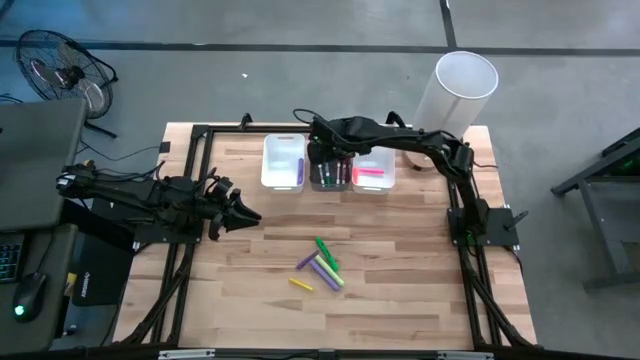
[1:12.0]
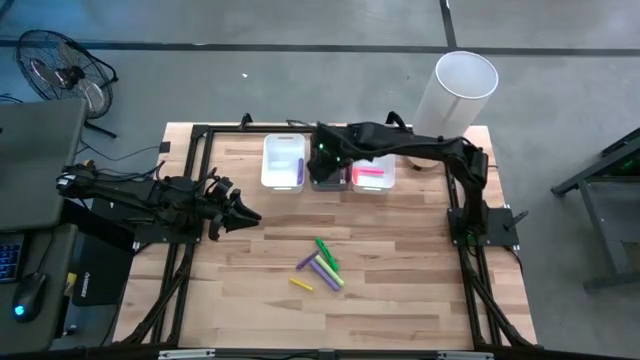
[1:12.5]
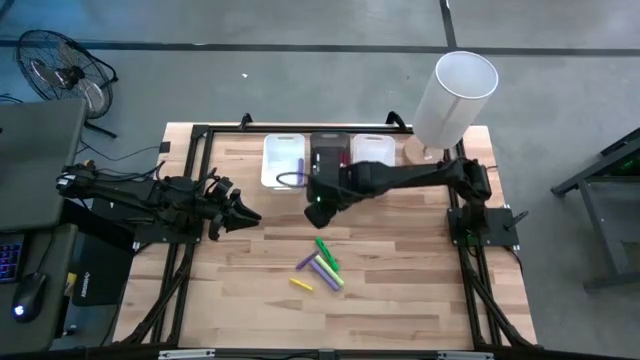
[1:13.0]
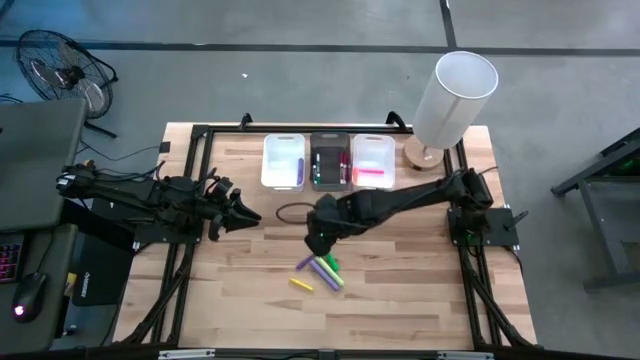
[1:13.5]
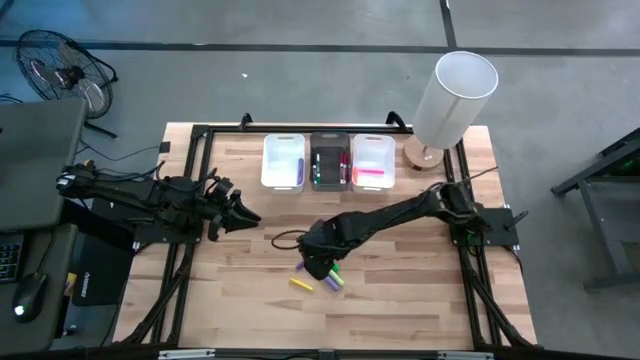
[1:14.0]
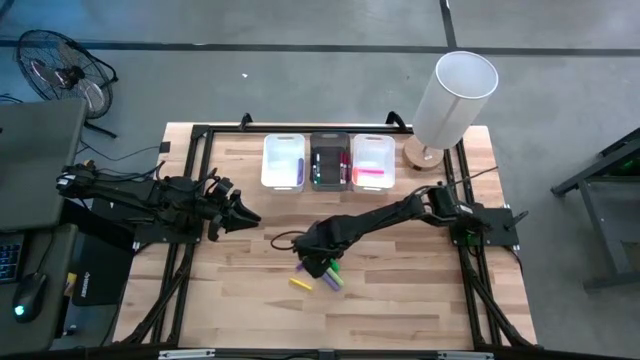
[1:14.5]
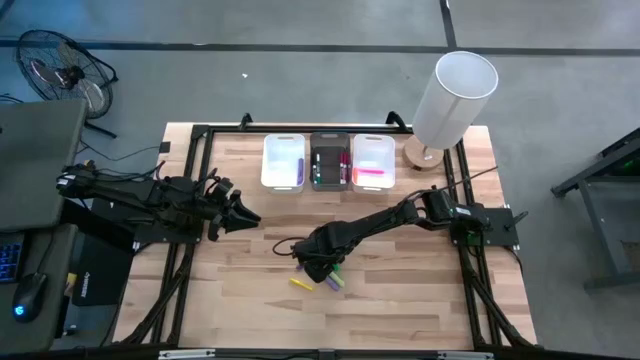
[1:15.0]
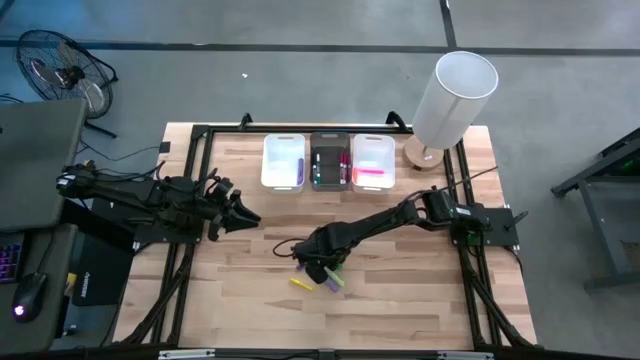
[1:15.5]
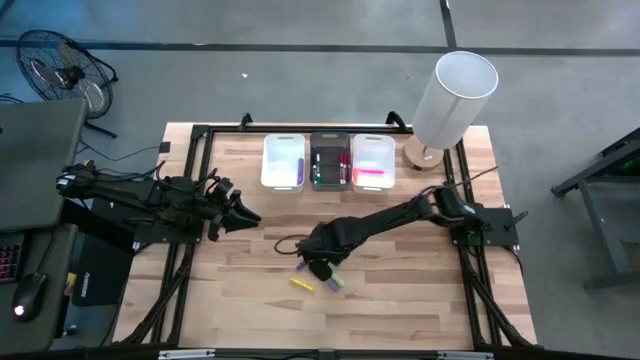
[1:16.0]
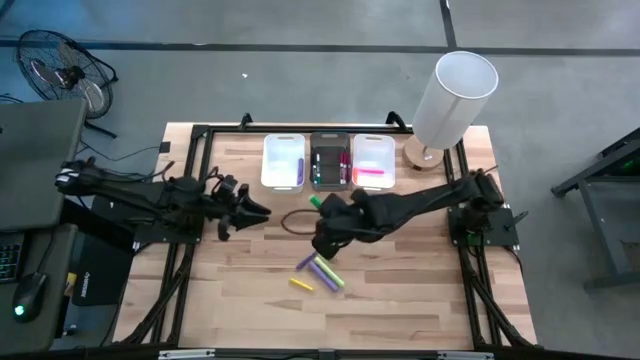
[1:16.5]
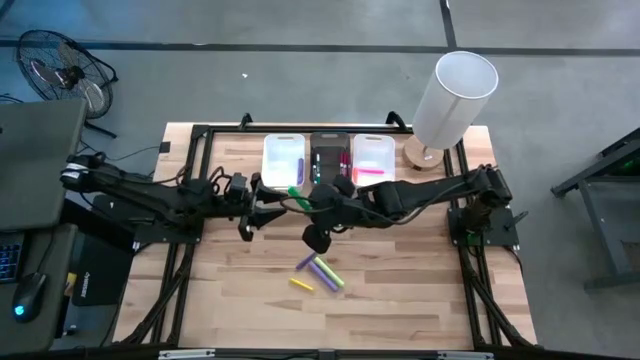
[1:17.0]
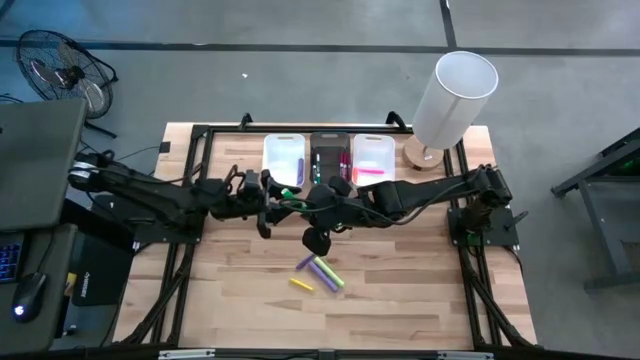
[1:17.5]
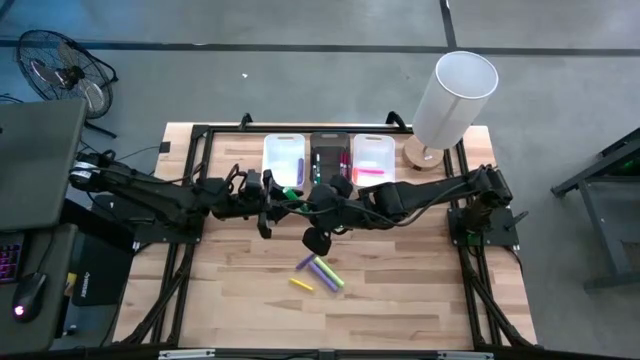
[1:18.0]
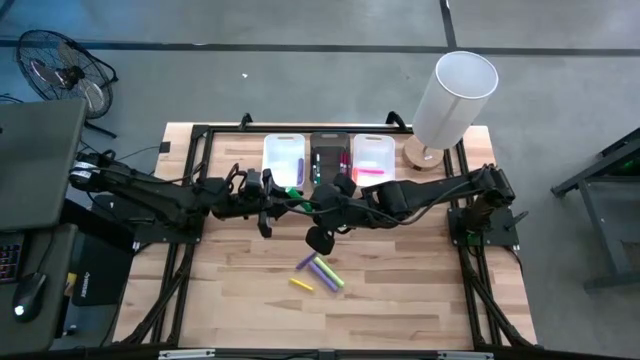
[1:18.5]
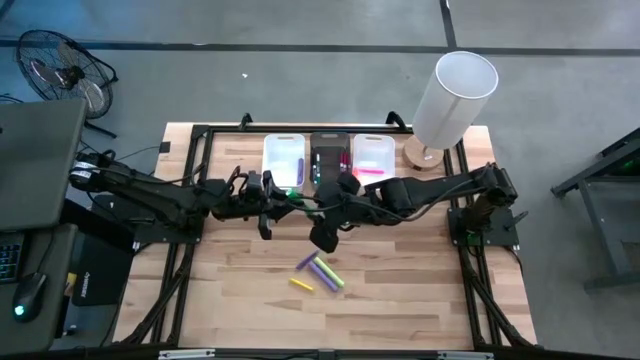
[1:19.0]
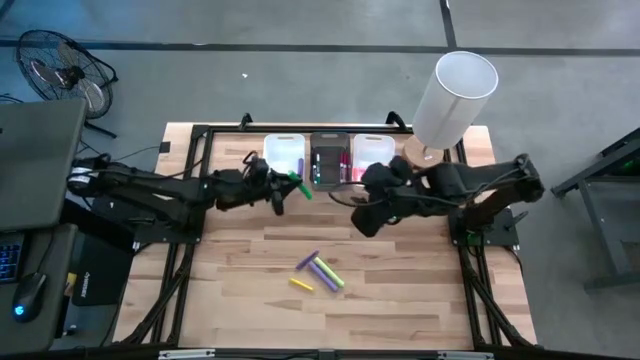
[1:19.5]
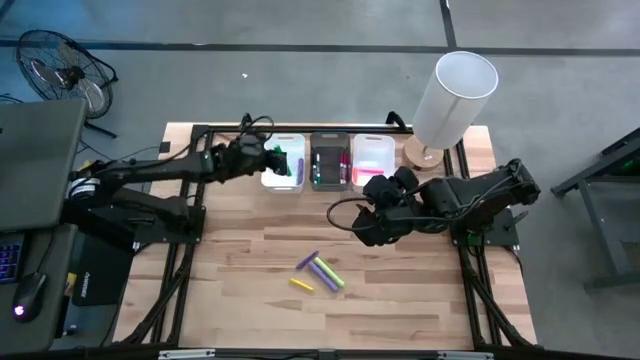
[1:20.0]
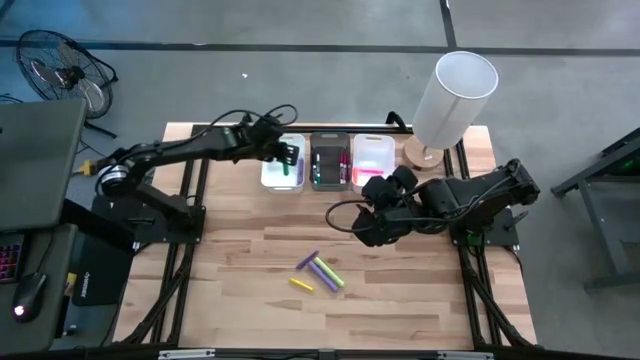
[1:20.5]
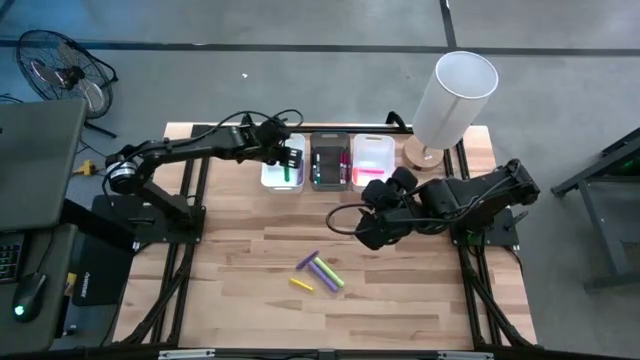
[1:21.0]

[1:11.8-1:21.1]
Task: Pick & Place Markers
Put the green highlighter pen into the left white bin

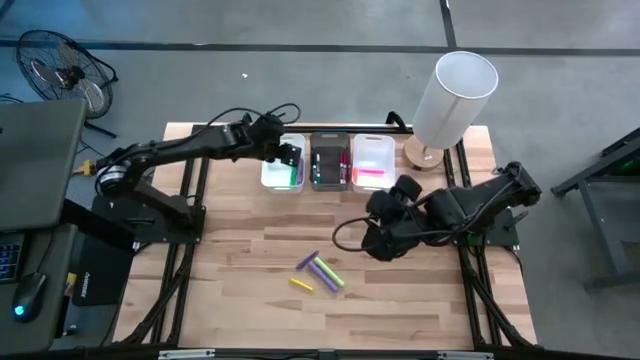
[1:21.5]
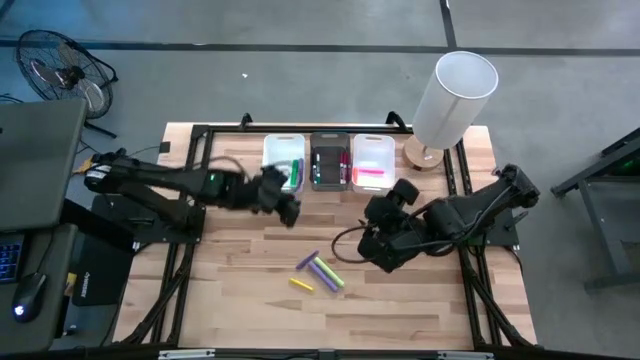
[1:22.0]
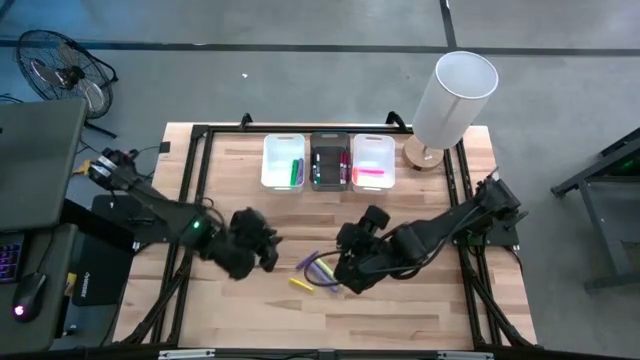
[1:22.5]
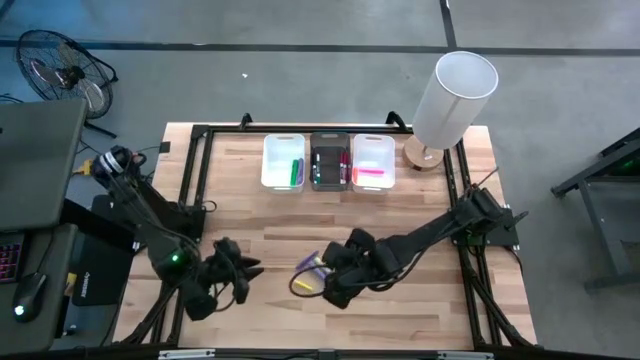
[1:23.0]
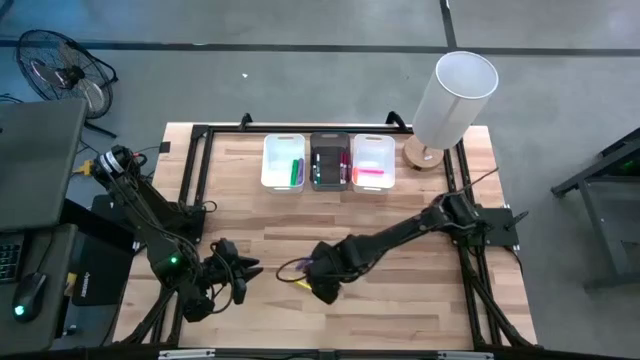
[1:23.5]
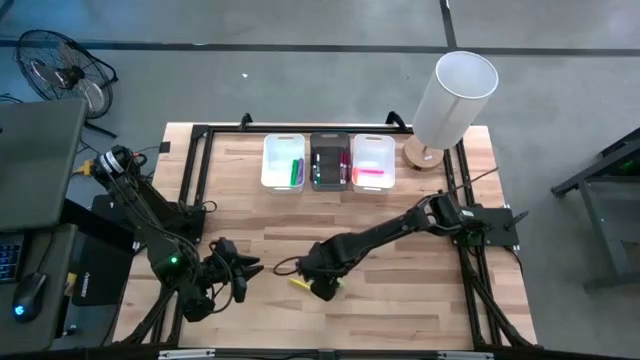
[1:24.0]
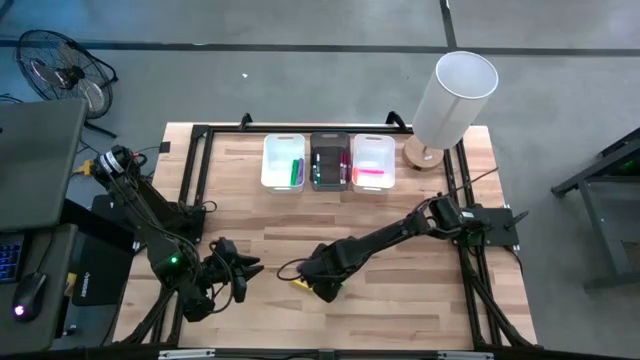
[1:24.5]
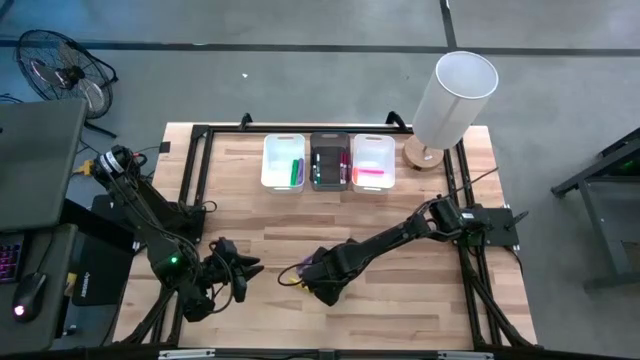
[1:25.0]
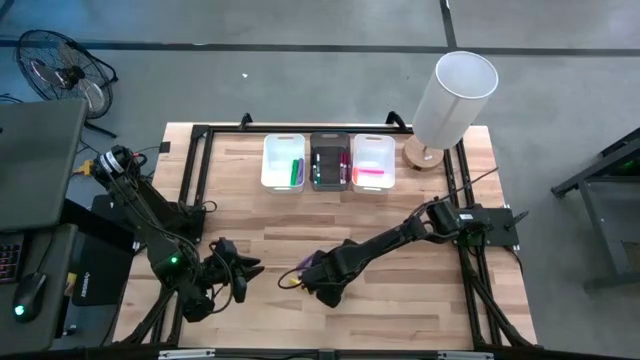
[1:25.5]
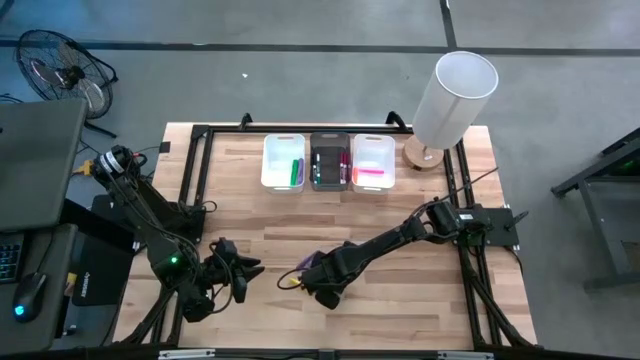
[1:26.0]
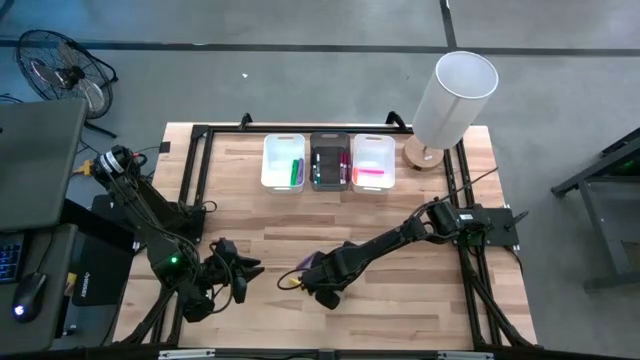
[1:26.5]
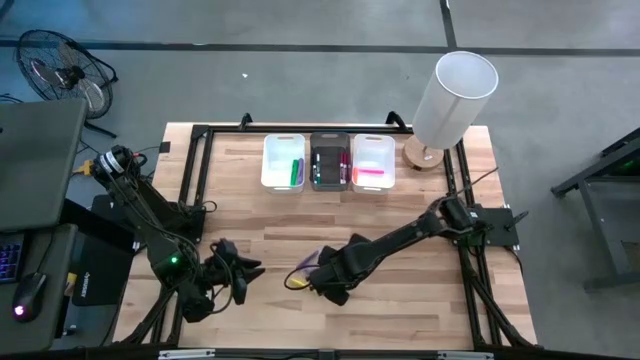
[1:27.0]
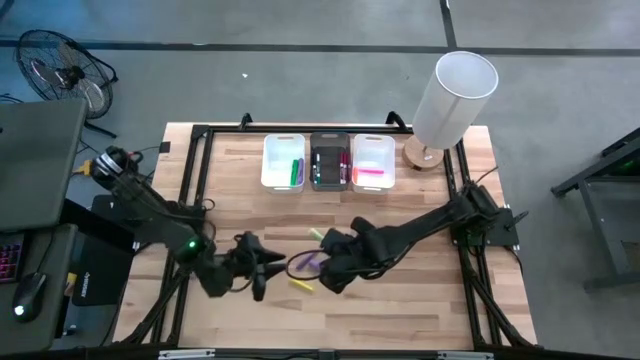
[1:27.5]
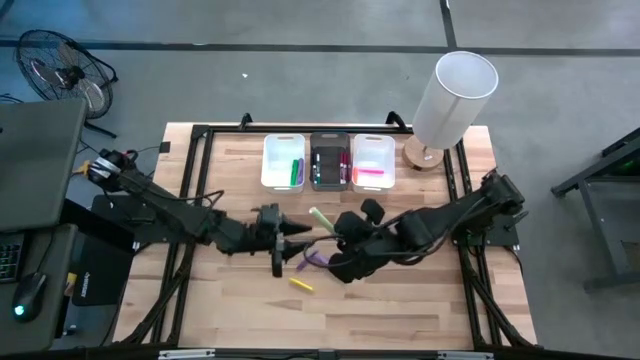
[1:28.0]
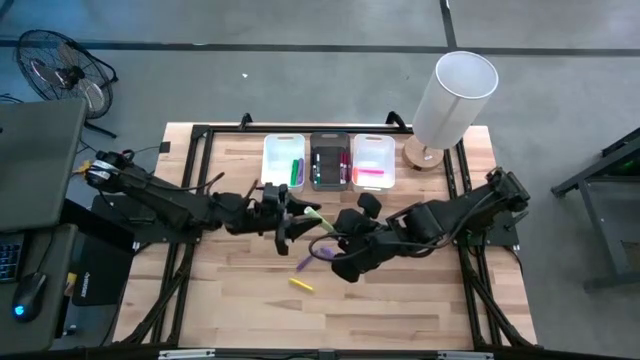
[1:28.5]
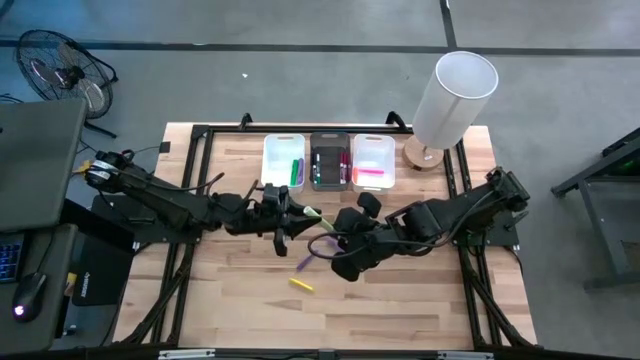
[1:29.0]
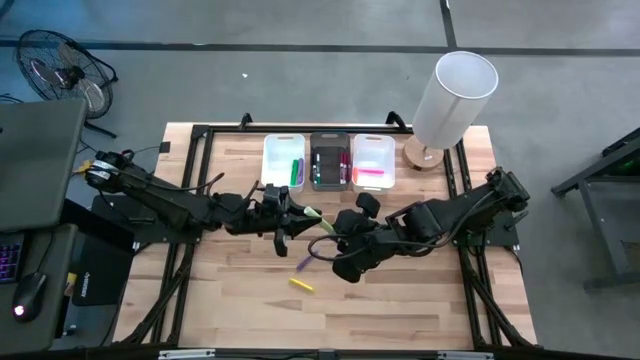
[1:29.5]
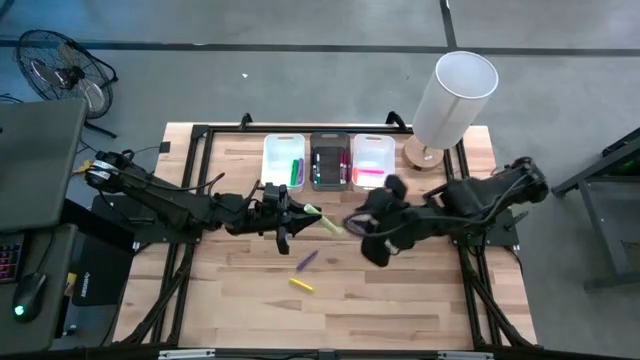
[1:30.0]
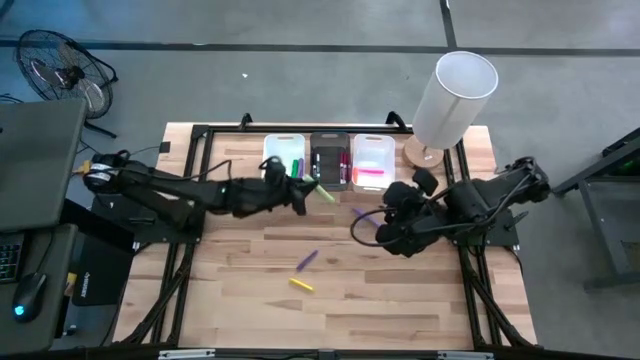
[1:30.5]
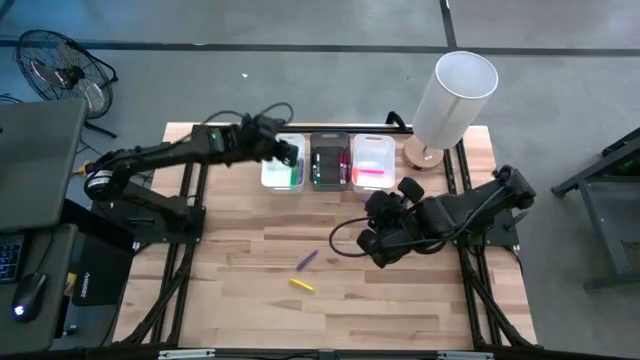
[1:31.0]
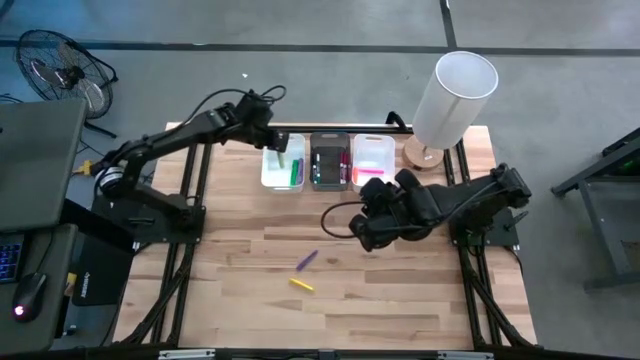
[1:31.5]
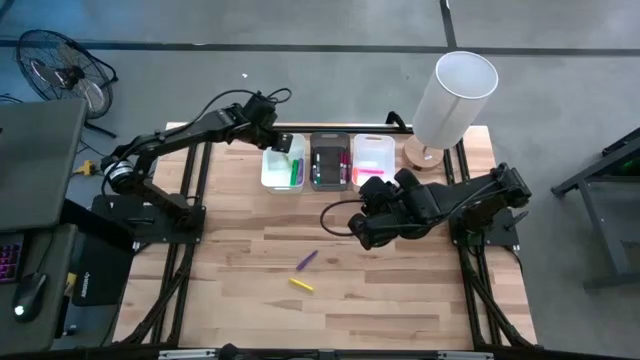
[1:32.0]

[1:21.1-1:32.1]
Put the light green highlighter pen into the left white bin

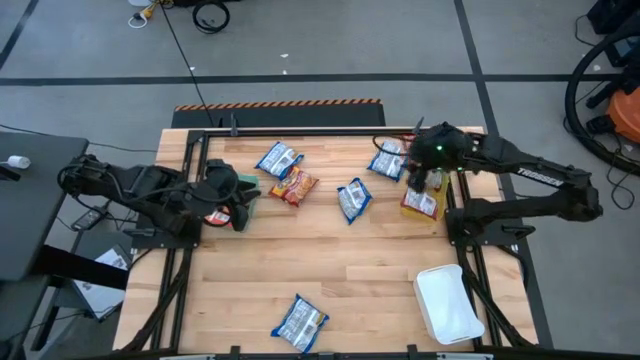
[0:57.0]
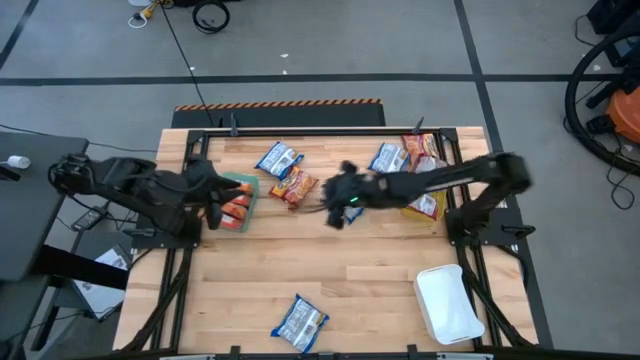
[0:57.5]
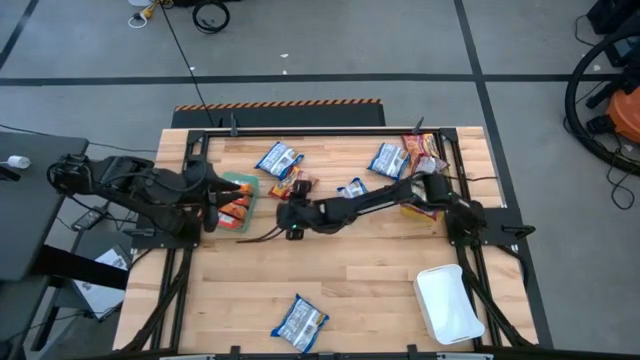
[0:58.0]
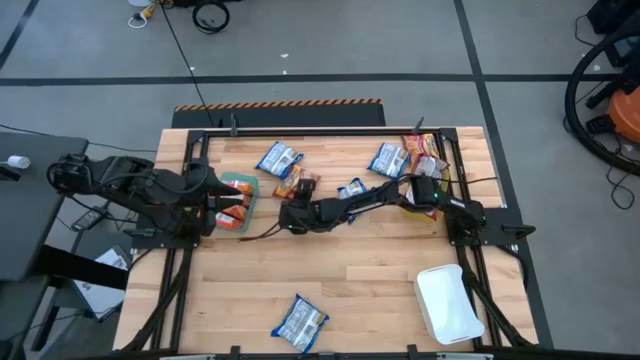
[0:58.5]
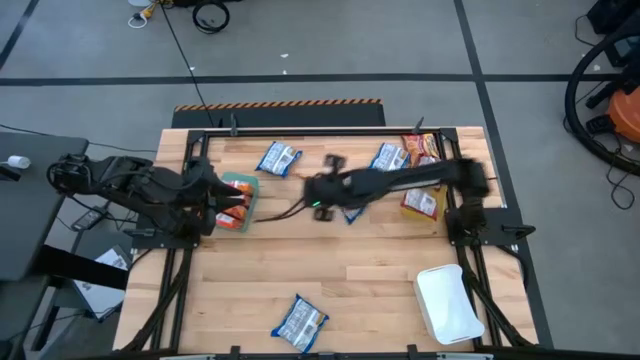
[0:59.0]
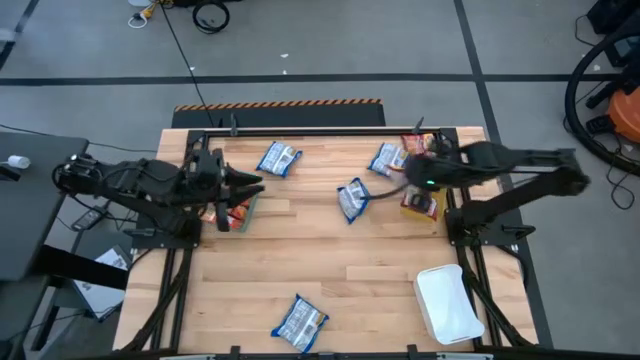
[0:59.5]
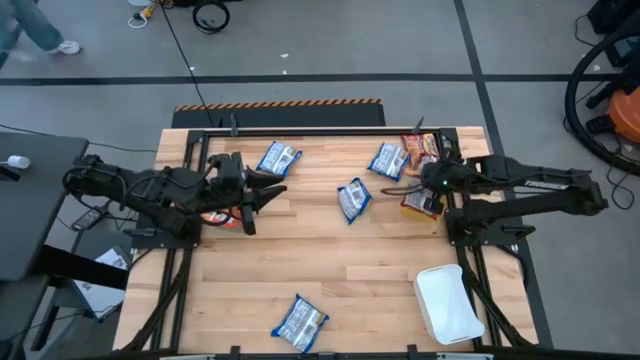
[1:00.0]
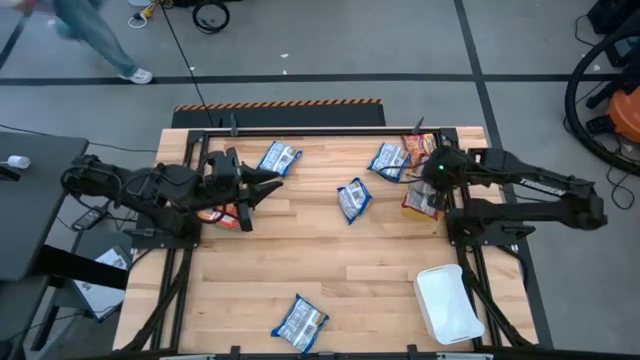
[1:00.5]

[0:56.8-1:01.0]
Task: Sort Maruchan noodles
Put the red noodle pack into the yellow bin
